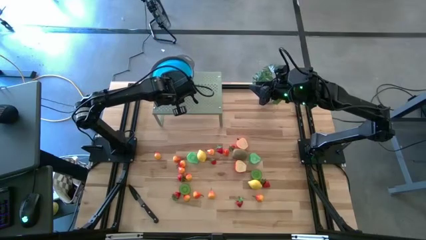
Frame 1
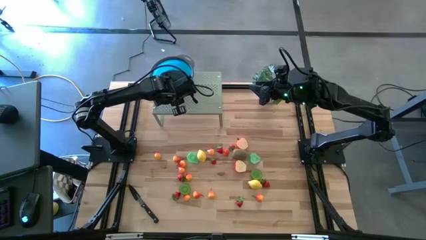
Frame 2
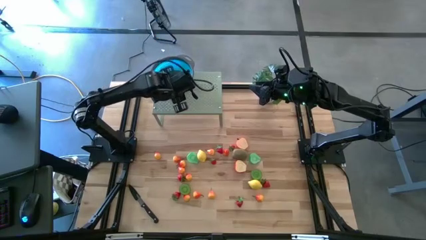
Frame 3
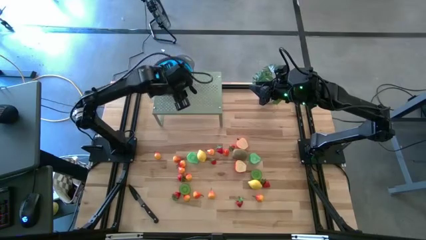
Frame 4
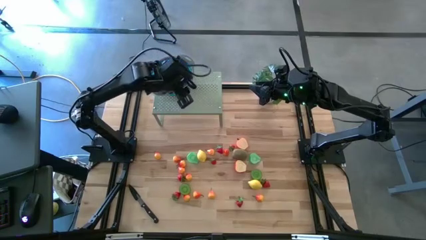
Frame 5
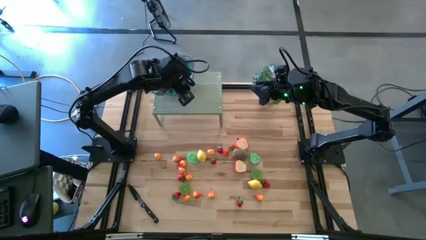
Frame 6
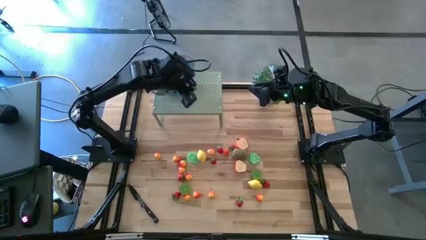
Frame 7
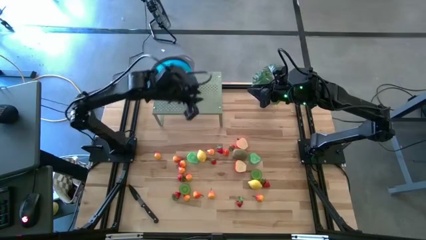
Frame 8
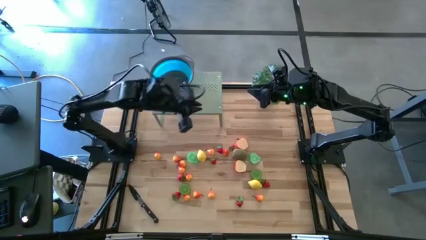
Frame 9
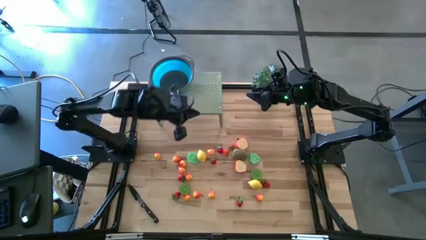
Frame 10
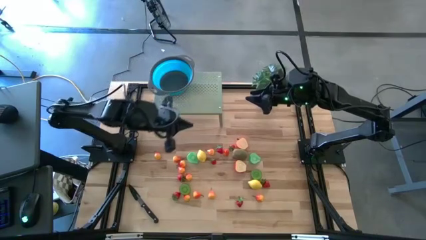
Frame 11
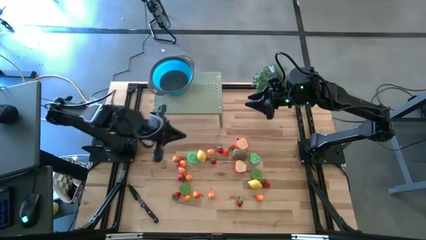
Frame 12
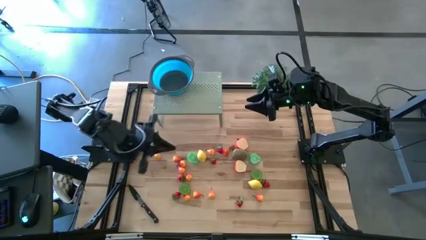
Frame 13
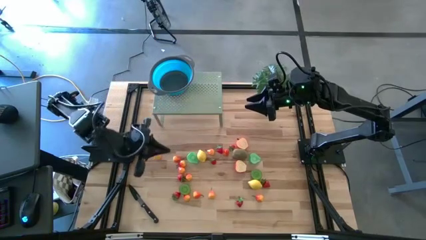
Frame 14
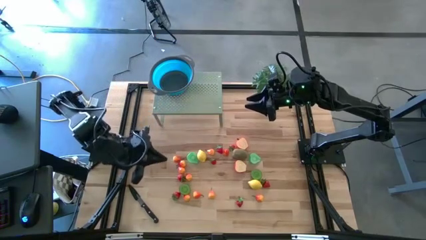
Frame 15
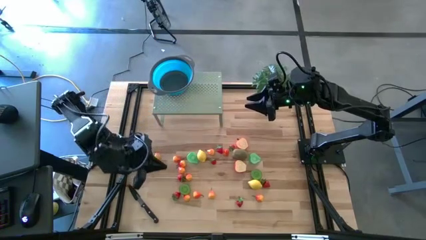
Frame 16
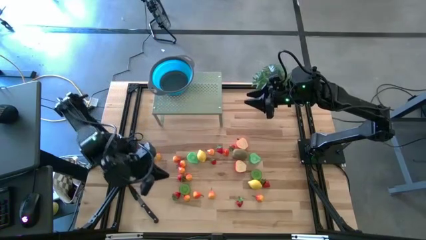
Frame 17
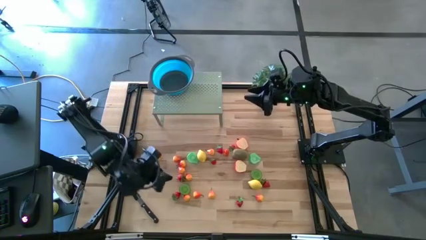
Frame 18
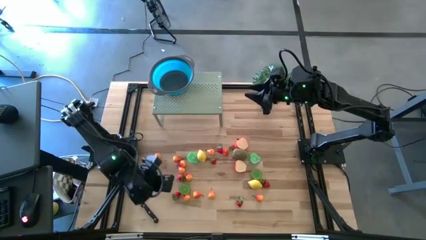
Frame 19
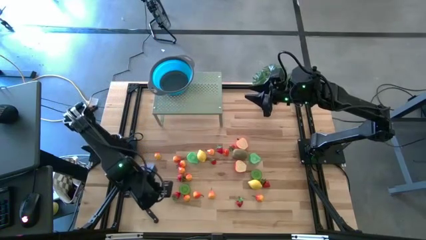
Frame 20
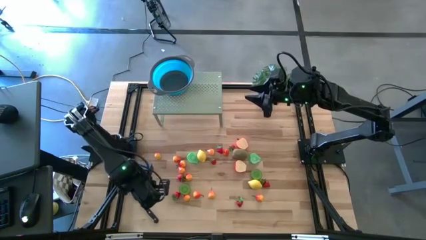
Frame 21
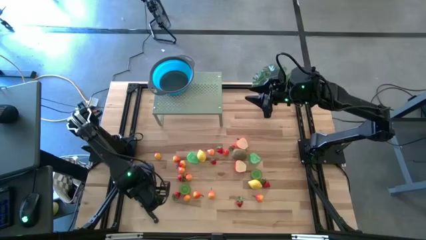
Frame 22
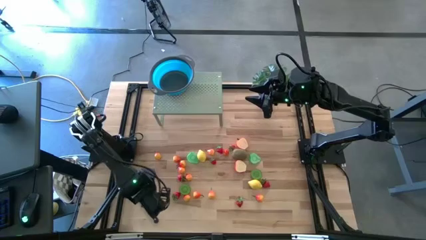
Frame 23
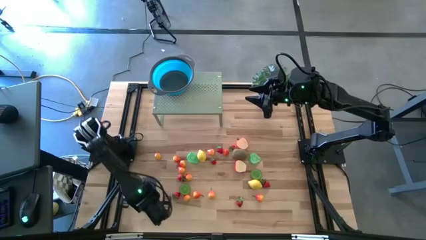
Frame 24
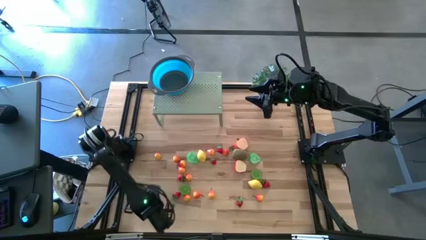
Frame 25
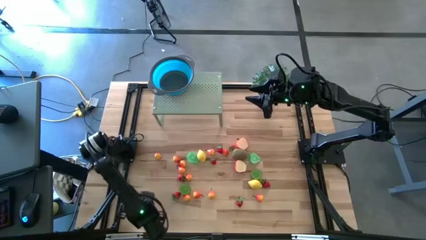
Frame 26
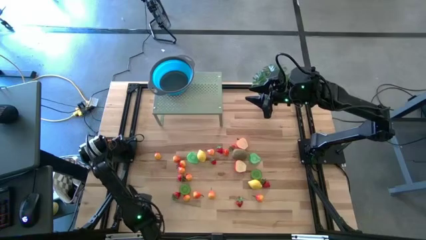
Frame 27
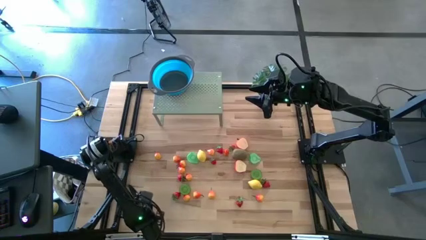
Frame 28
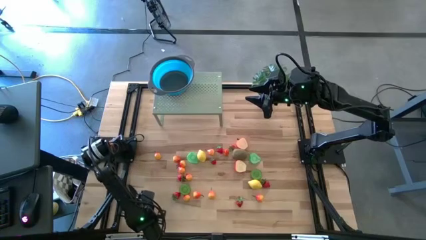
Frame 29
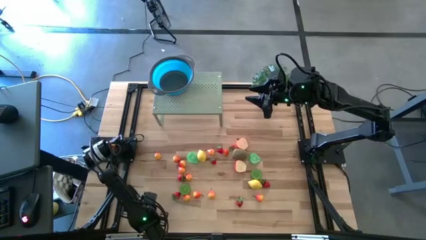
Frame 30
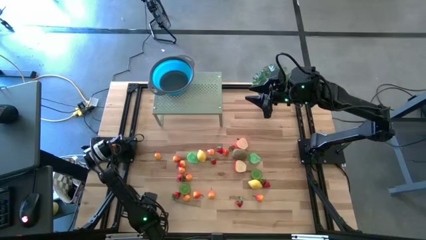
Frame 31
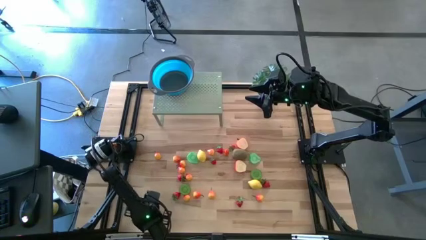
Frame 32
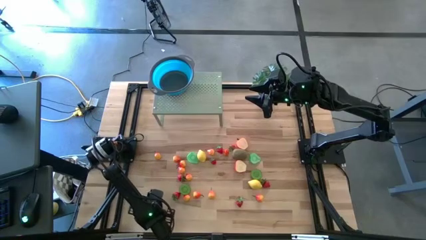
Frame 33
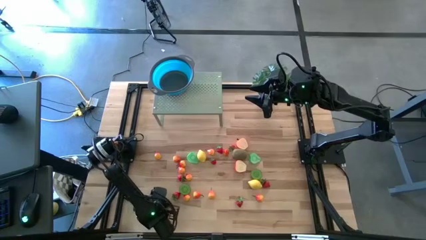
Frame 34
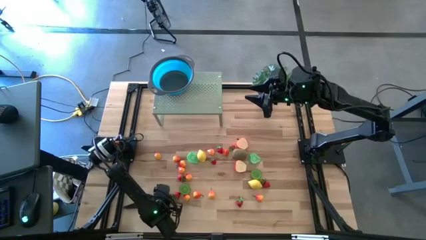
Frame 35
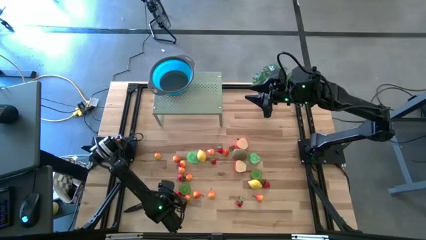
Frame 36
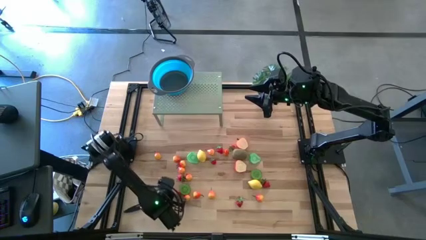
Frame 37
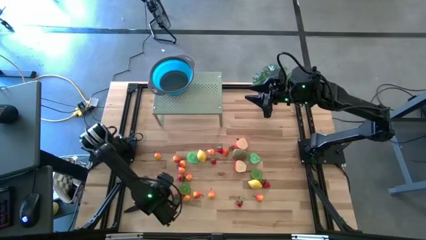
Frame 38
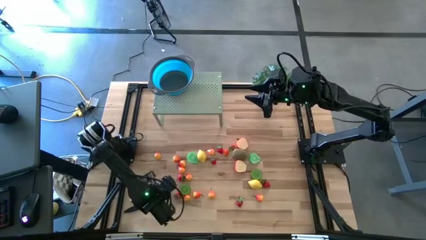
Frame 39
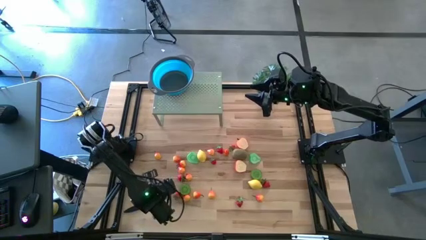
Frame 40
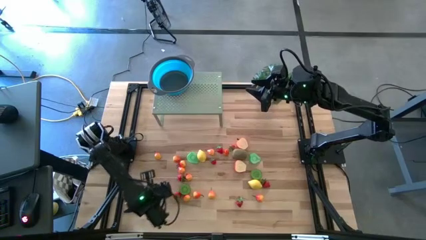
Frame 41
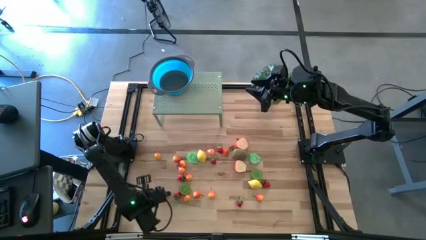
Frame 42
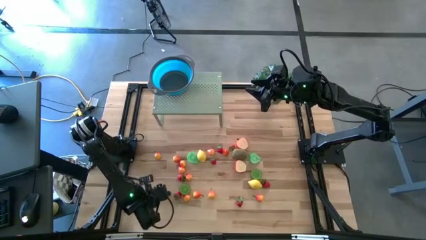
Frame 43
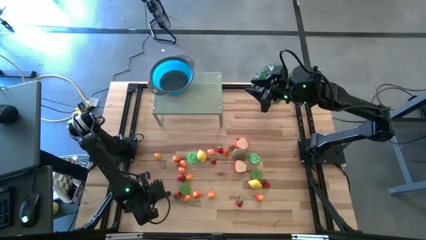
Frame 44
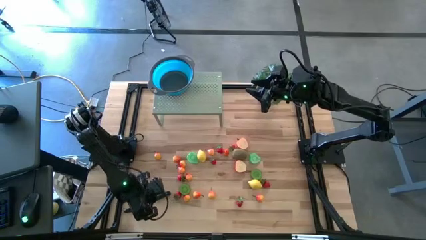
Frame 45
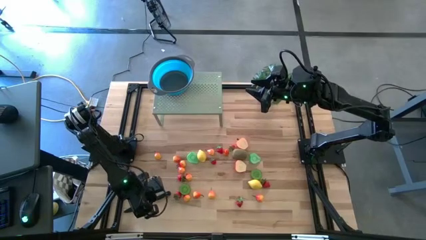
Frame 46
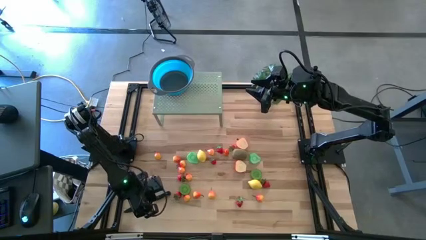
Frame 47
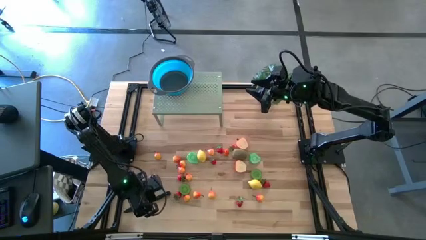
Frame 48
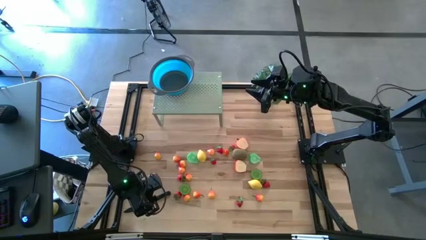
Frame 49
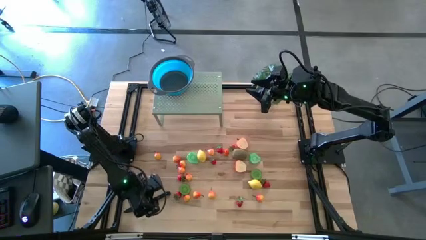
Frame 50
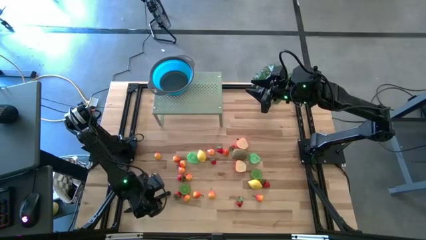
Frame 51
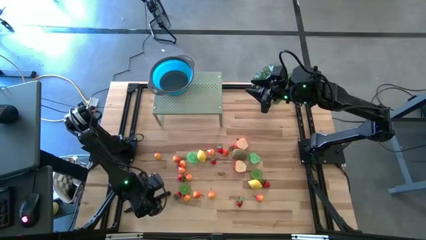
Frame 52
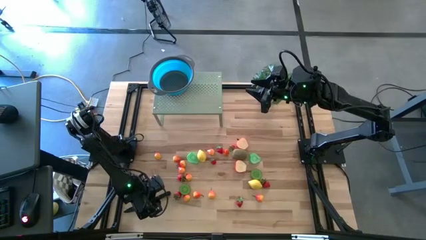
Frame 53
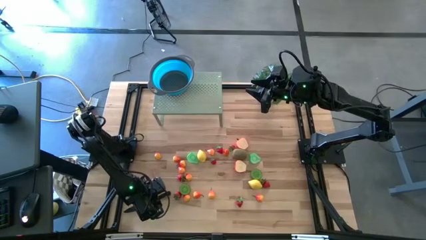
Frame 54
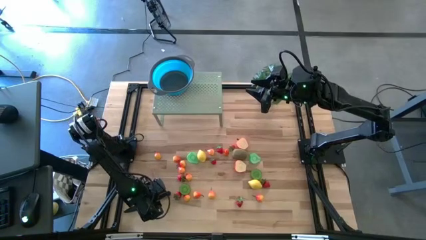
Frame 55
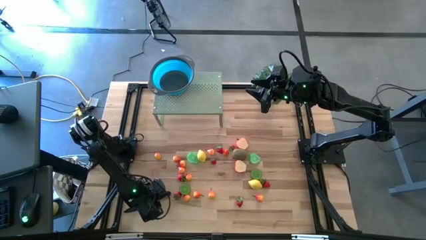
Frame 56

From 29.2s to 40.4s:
Task: Pick & Place Fruit
Put the black knife on the shelf

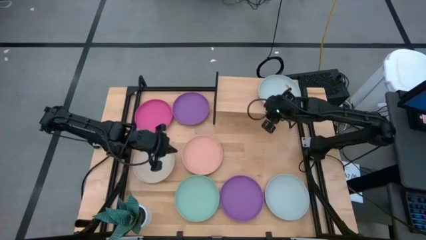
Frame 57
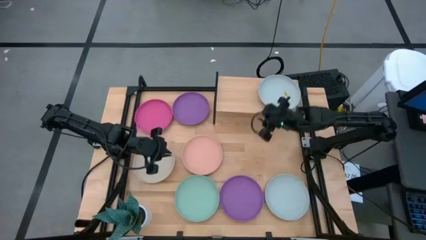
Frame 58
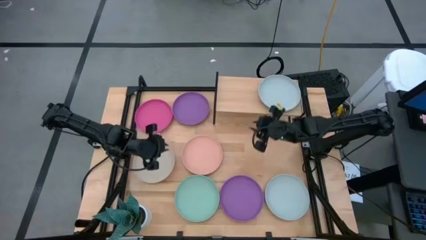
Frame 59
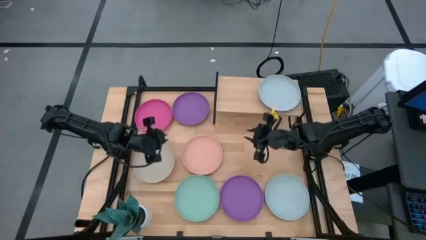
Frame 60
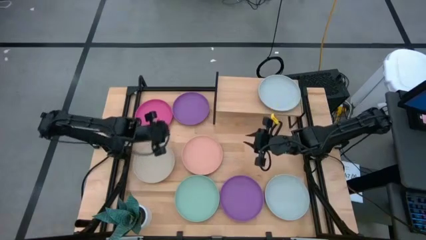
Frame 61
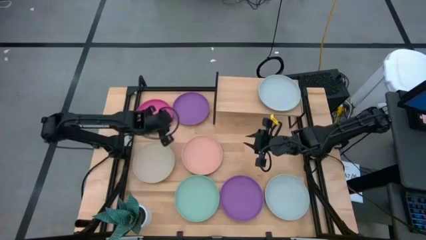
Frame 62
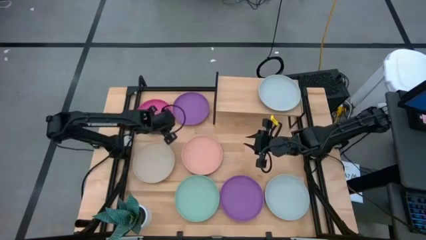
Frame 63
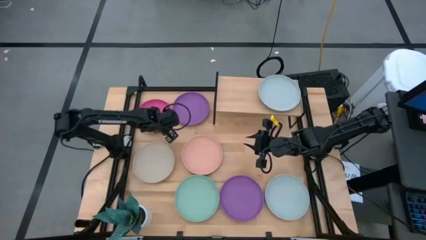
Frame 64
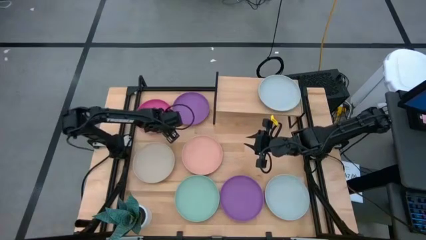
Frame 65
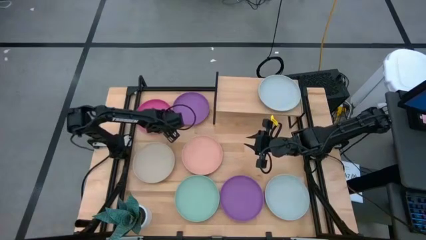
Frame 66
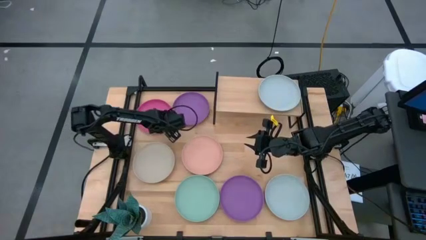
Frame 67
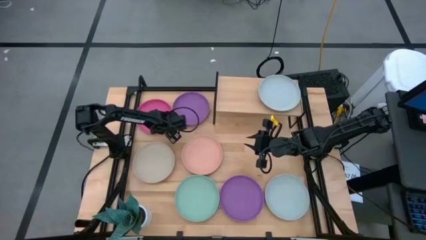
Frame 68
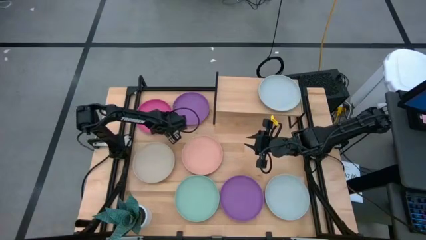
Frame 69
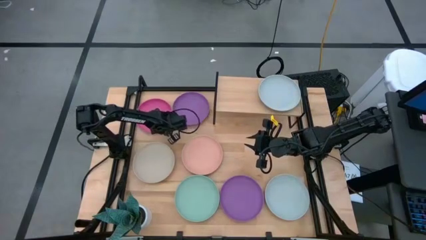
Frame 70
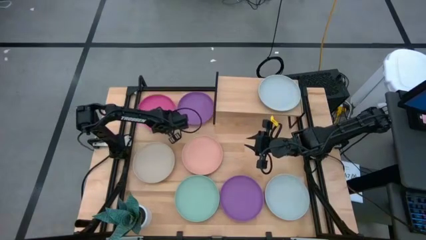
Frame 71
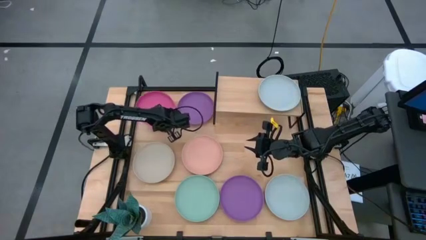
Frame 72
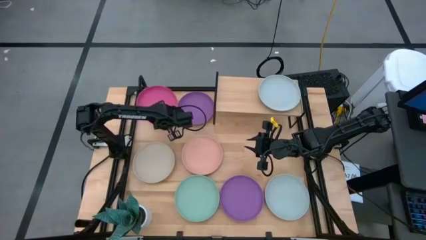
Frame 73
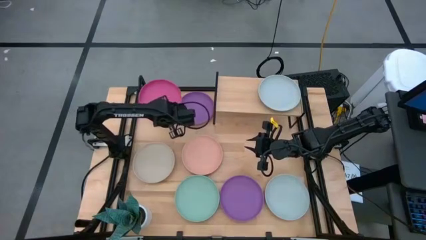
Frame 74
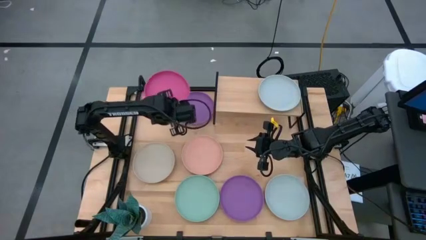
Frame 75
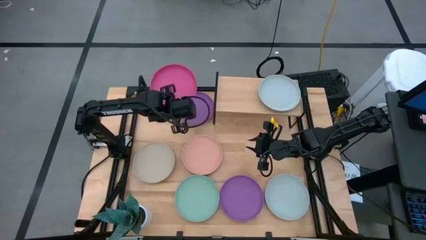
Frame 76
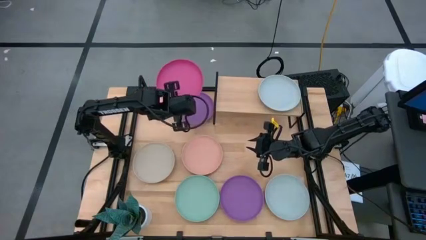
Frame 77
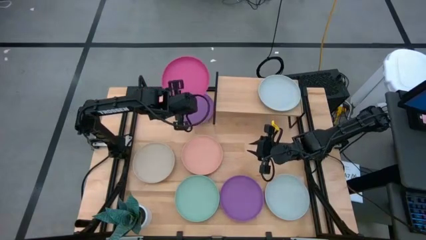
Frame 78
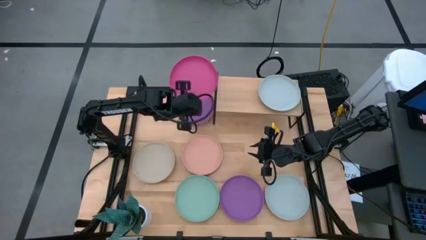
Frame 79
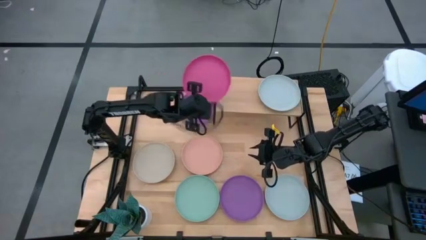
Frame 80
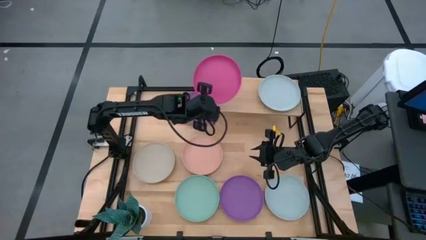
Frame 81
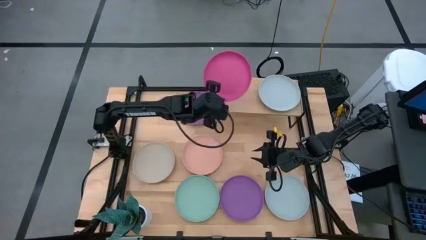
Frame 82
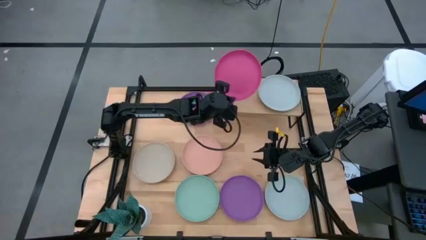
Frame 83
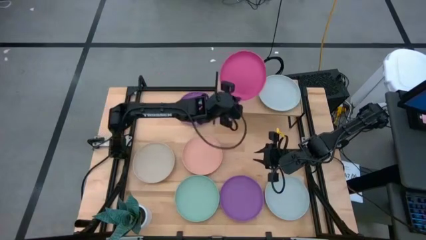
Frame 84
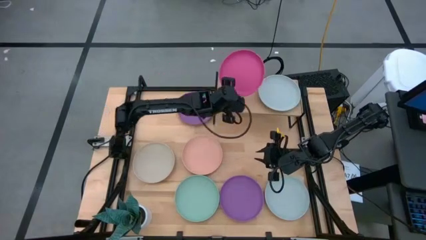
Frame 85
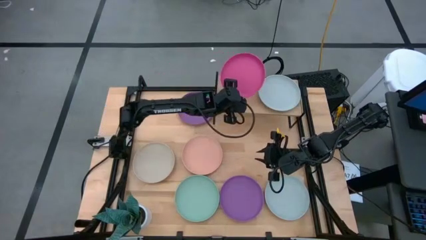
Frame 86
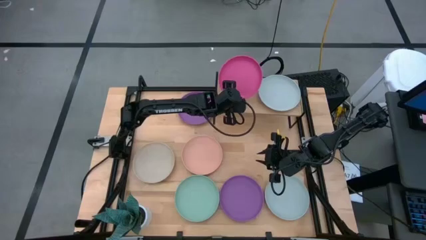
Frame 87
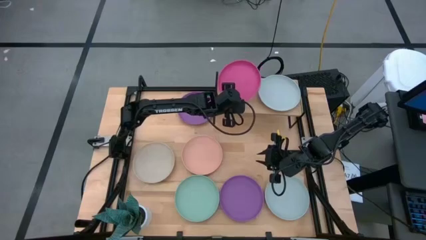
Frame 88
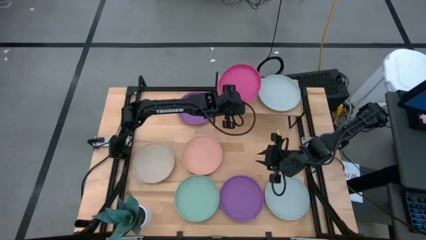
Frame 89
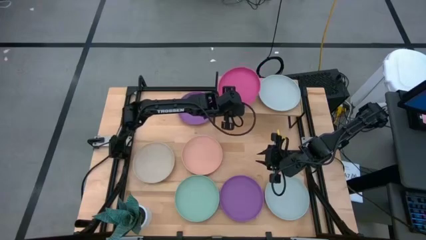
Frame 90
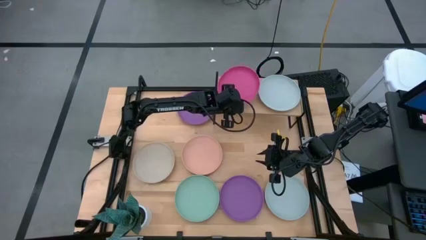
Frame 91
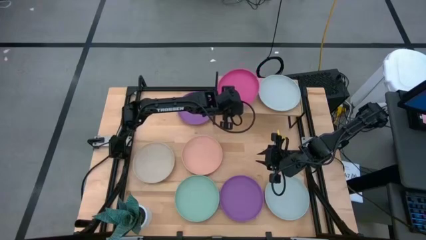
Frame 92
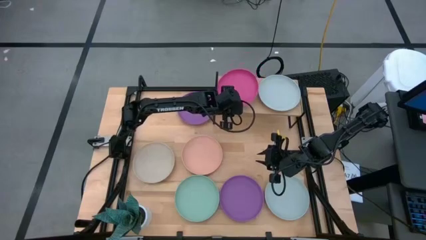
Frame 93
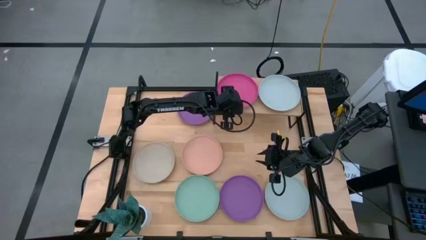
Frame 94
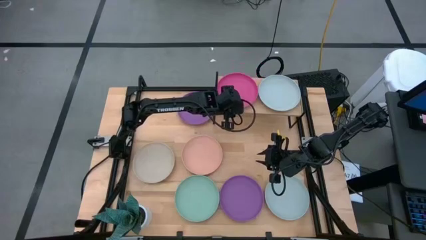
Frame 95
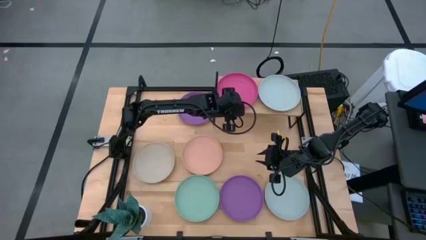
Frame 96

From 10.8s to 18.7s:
Task: Place and stack plates onto a shelf
Put the pink plate on the shelf
